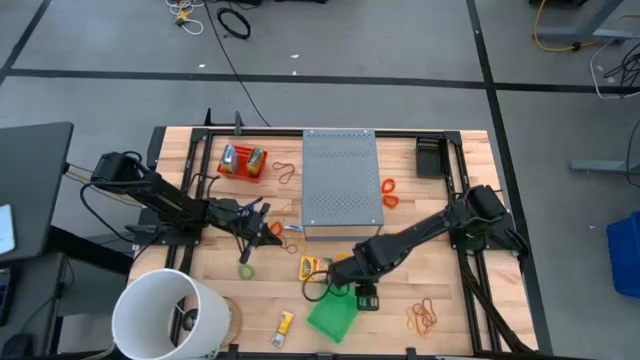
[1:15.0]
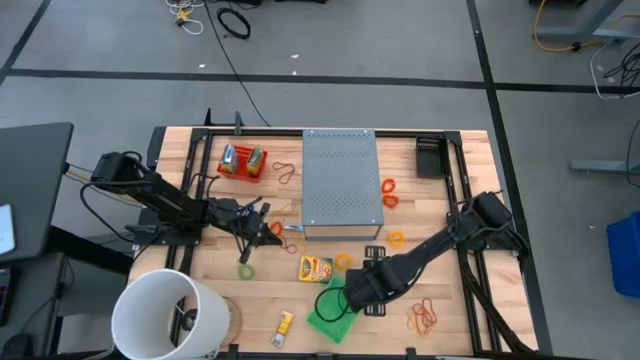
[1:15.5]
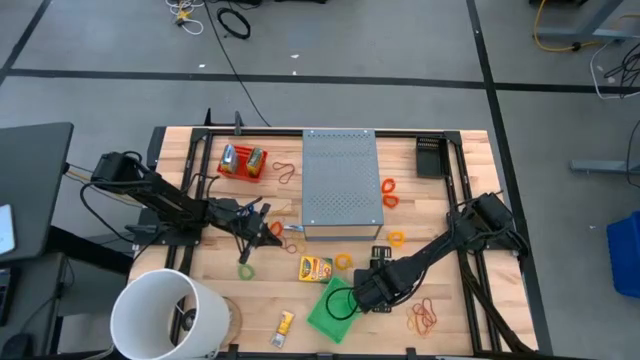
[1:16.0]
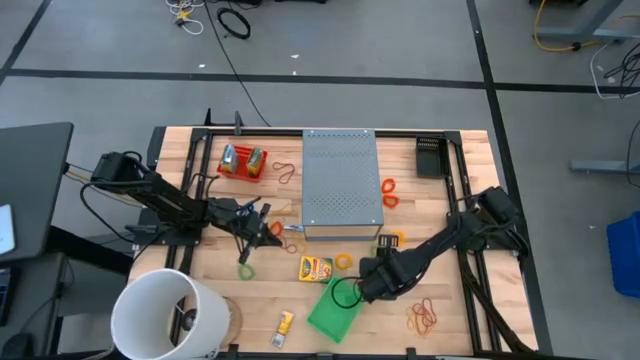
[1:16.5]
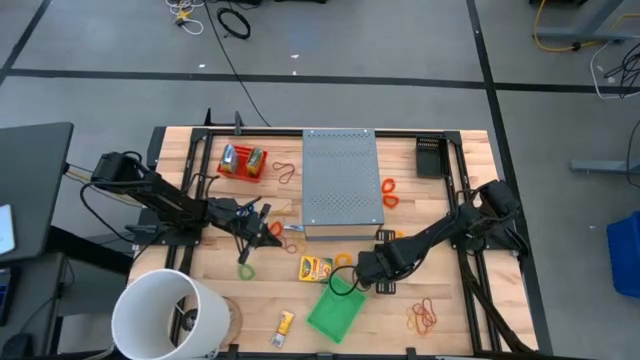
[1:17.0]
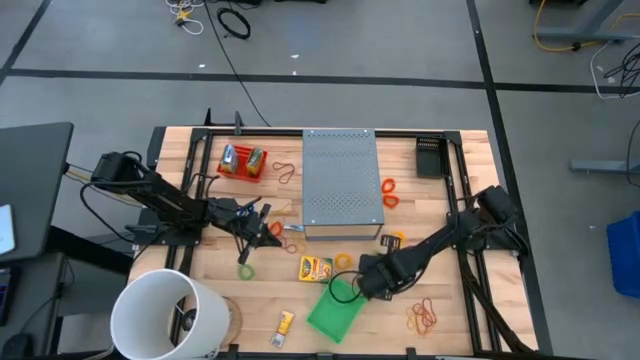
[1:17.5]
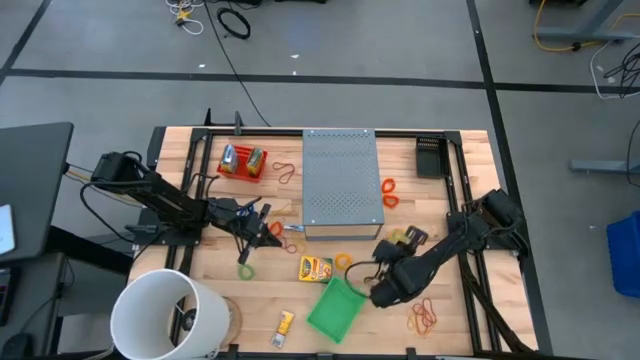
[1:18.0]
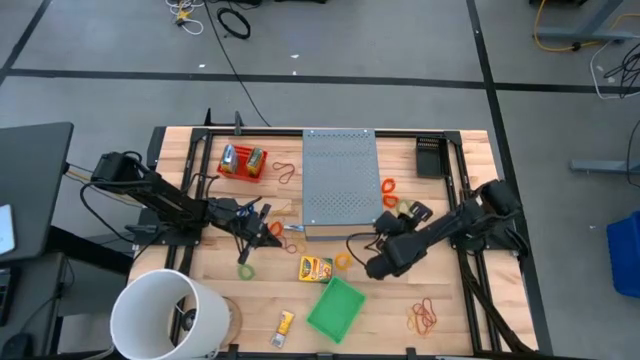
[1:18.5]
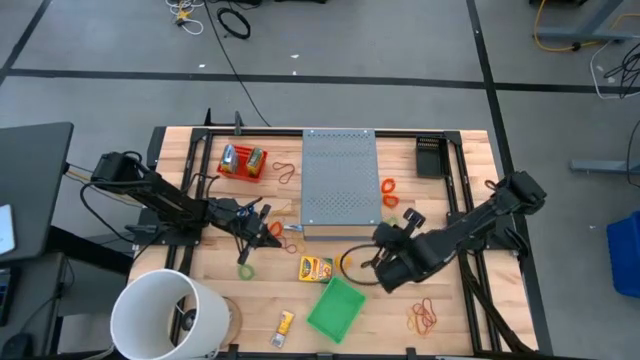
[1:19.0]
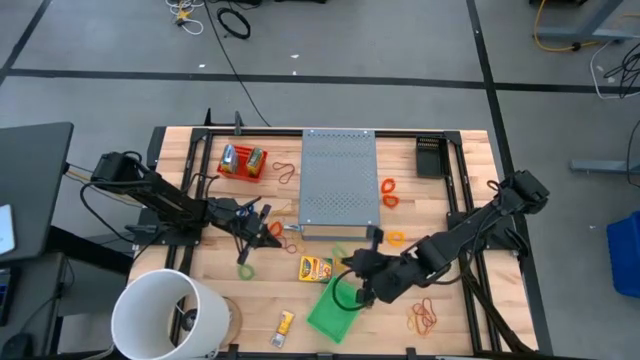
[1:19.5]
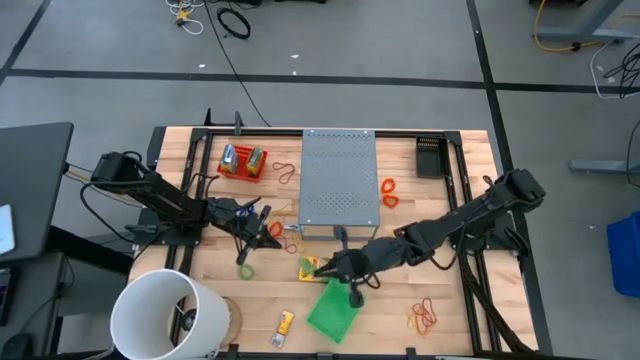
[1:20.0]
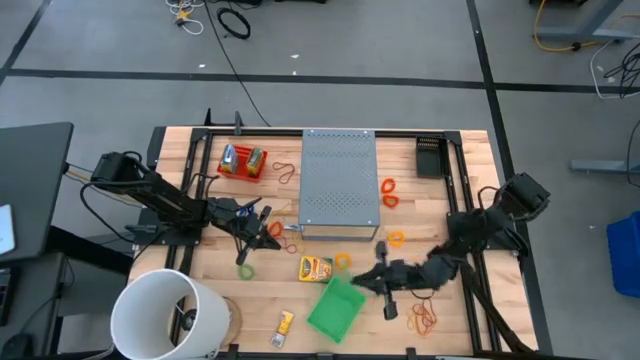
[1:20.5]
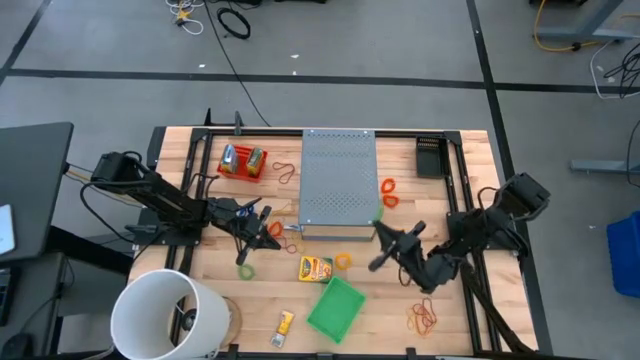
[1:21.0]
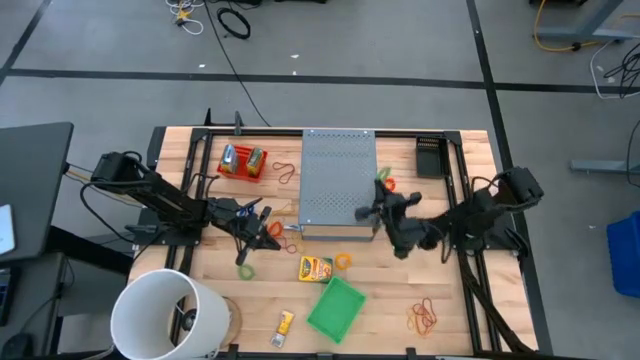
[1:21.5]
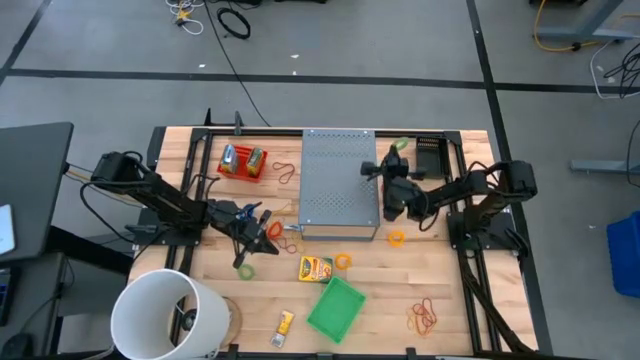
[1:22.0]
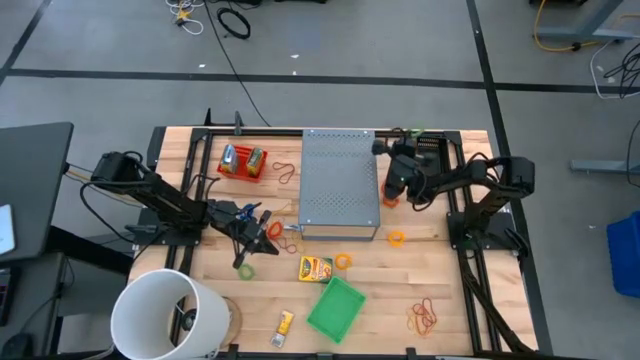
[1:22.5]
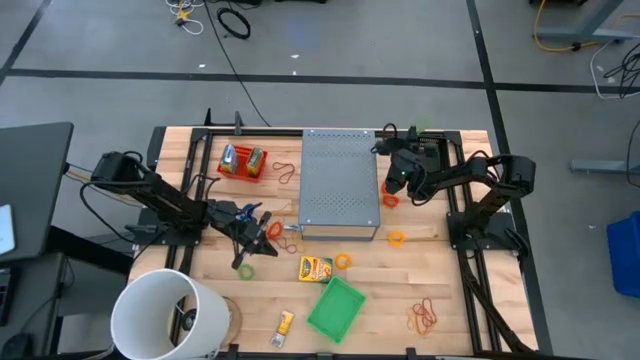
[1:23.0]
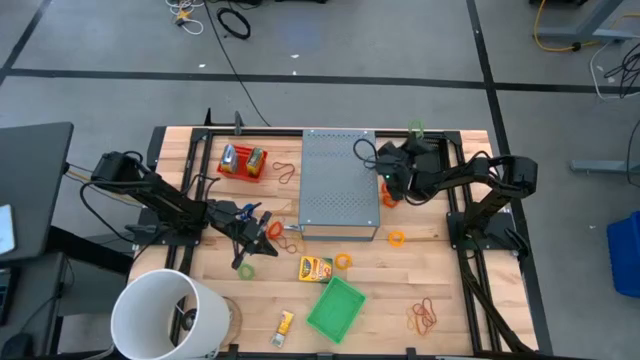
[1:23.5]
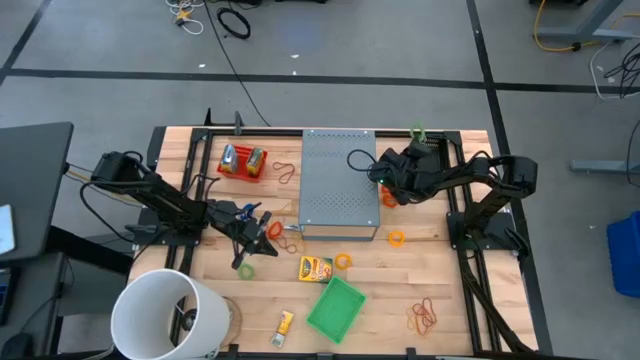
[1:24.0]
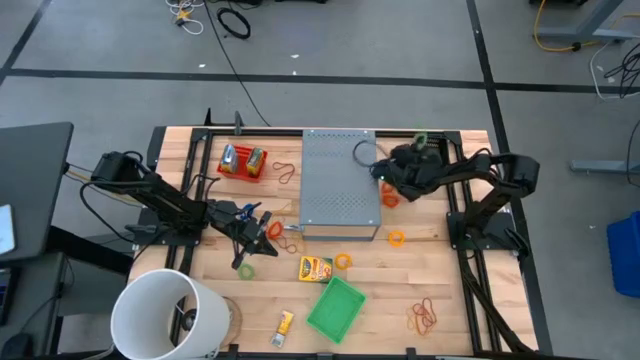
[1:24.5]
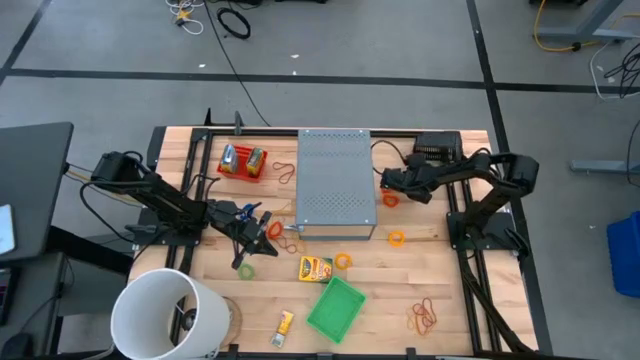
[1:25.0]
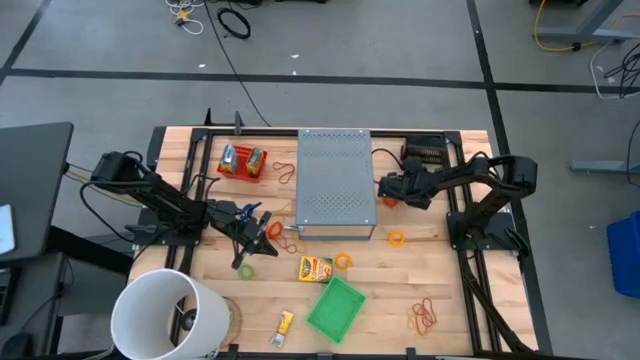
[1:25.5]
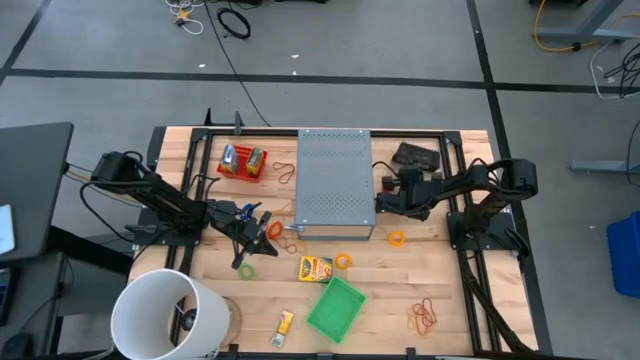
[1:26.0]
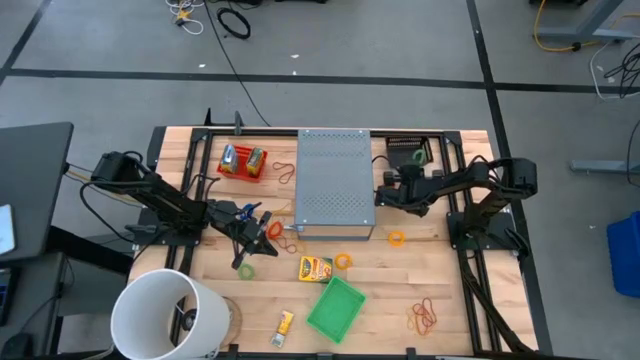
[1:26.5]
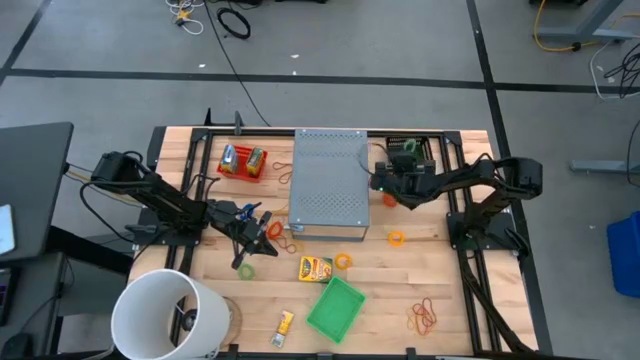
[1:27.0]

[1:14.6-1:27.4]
Task: Pick & Place Office Desk Supplies
Put the green spring keychain into the black basket

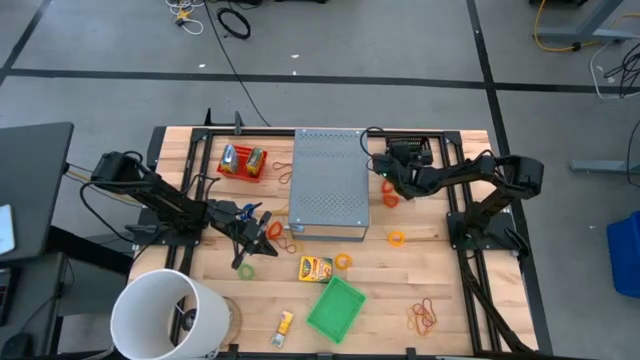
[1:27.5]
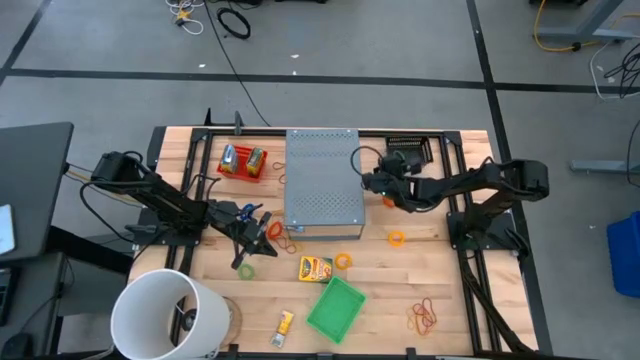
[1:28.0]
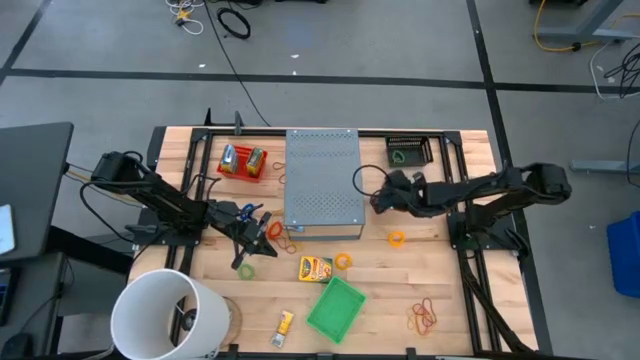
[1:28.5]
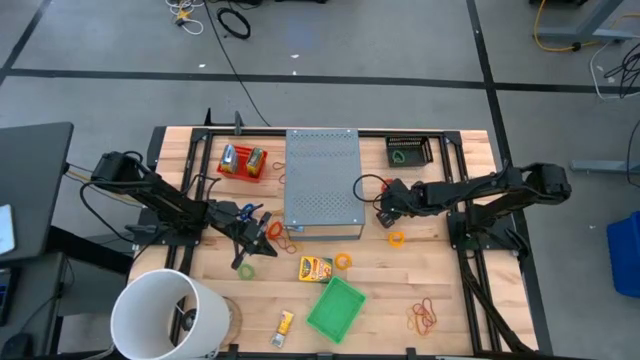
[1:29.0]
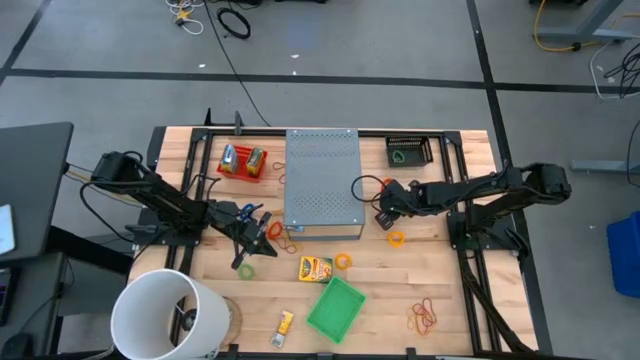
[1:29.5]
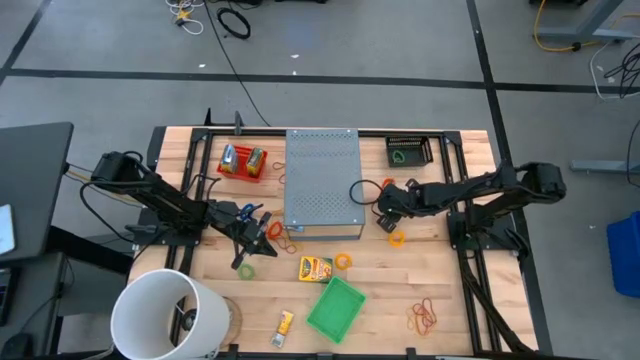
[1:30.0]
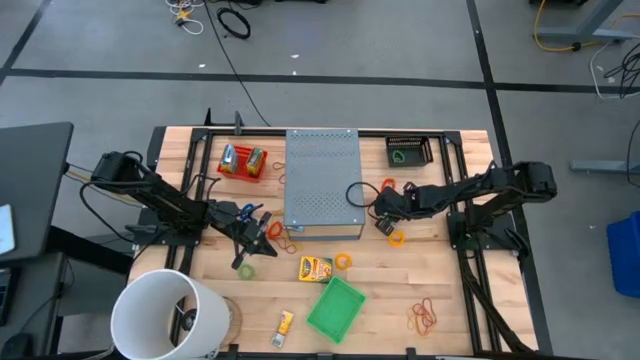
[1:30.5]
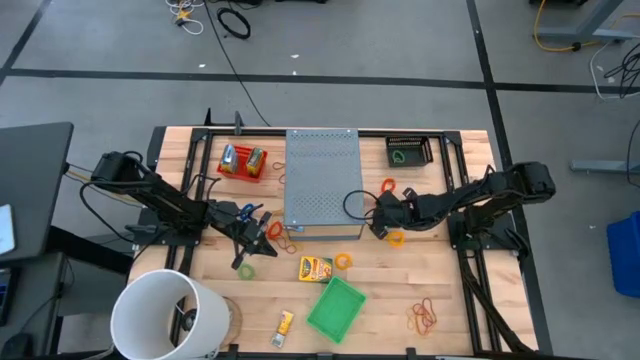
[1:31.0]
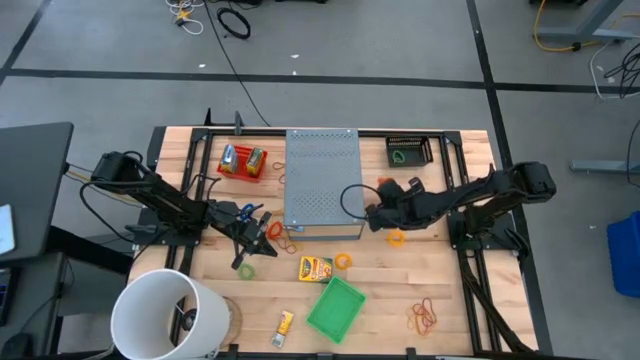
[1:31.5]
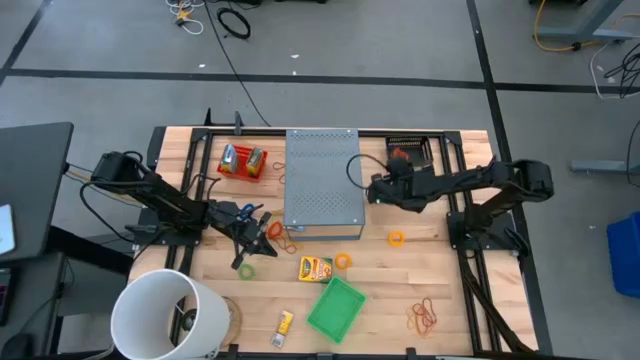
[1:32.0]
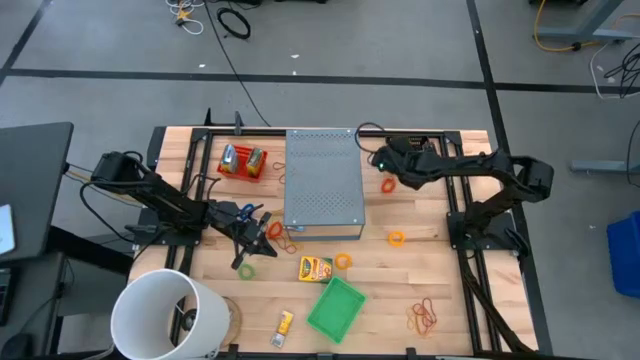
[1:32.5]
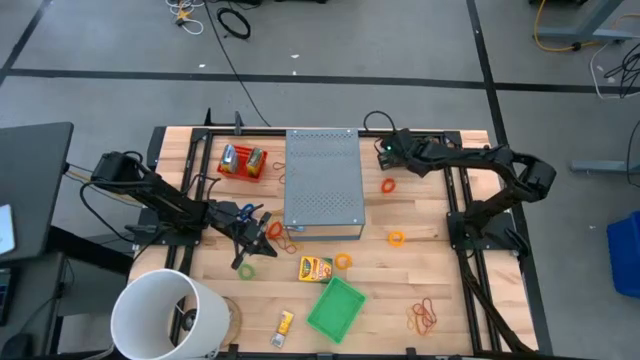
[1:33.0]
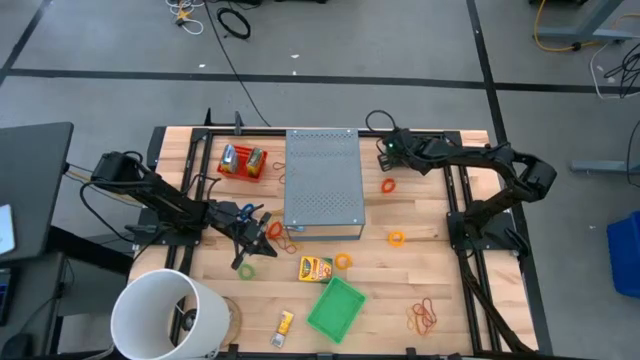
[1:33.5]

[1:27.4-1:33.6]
Put the orange spring keychain into the black basket

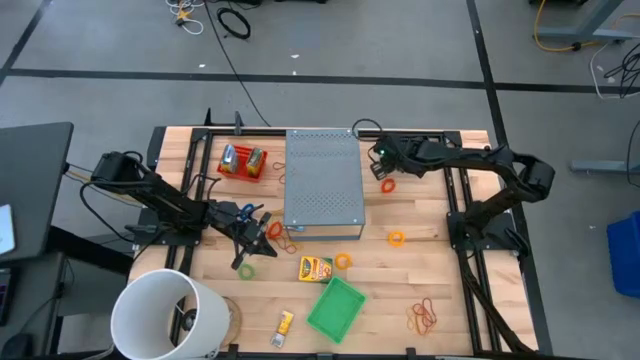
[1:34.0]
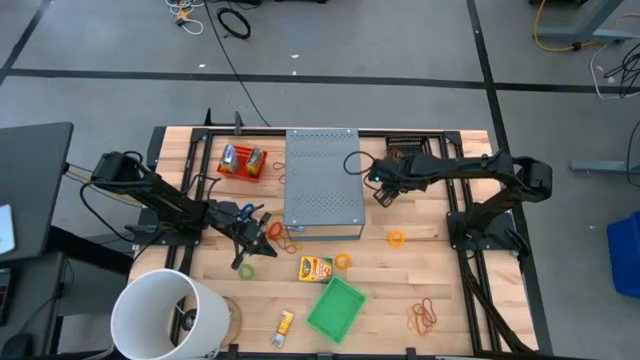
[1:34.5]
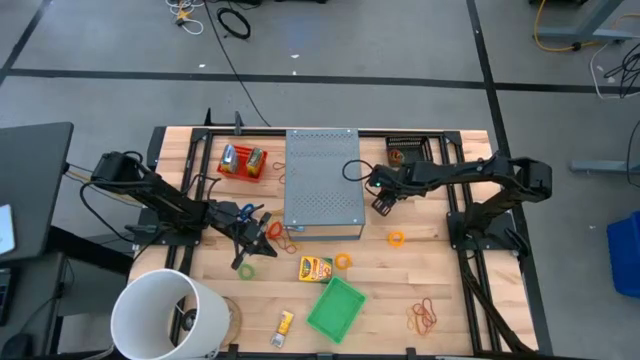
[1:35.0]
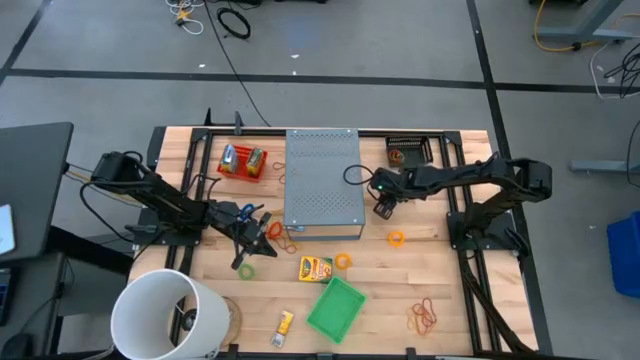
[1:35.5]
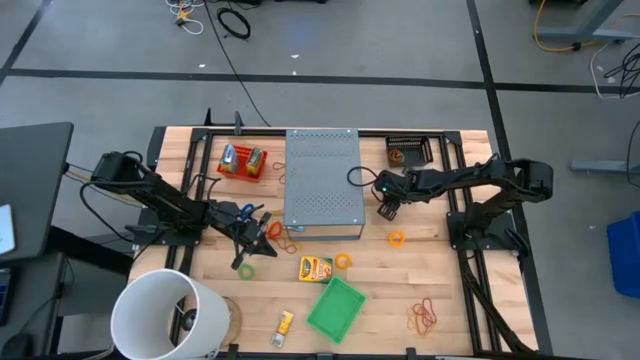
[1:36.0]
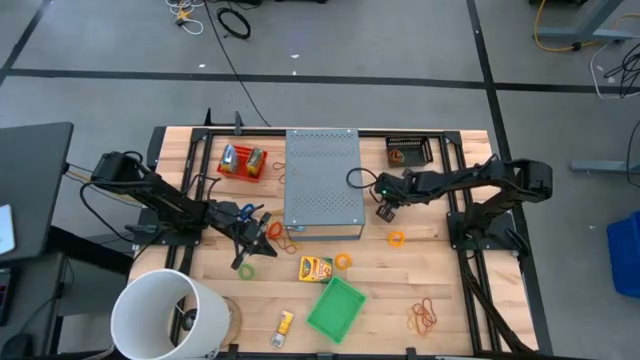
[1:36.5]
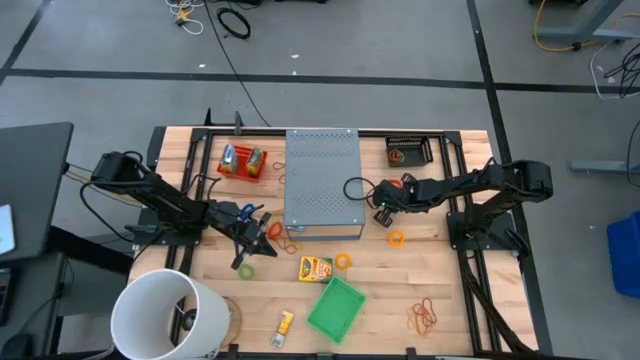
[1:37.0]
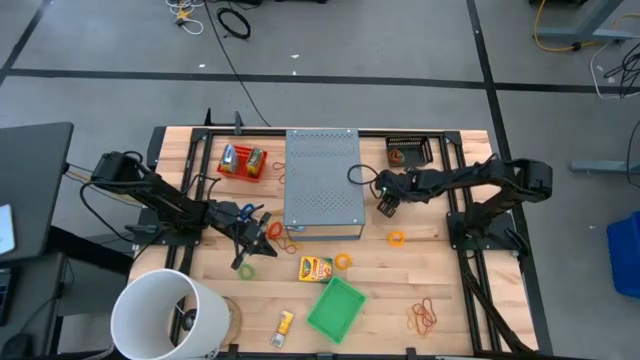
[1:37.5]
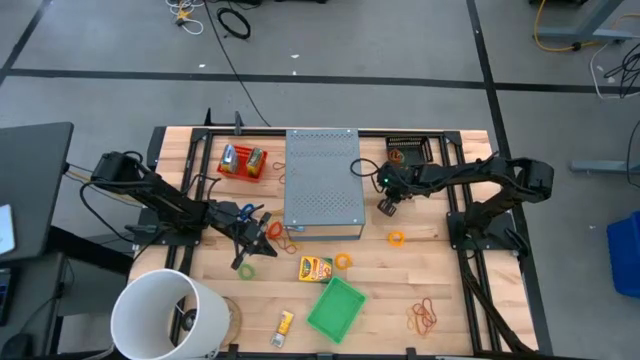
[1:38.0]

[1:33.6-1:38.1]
Put the orange spring keychain into the black basket
